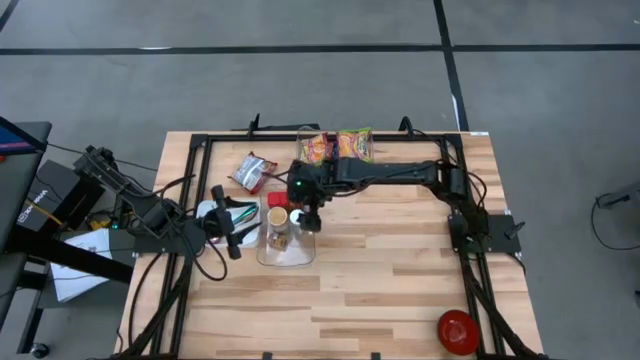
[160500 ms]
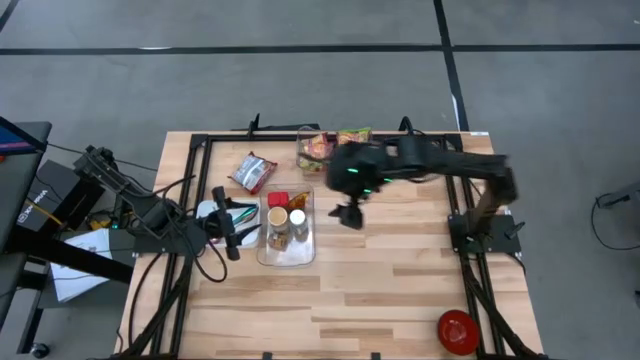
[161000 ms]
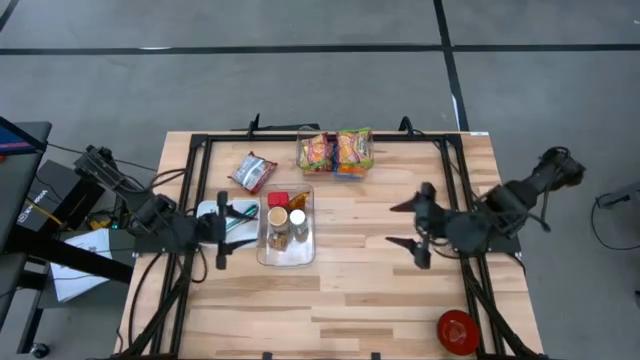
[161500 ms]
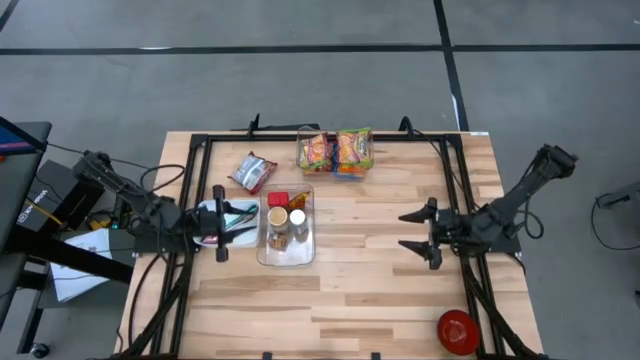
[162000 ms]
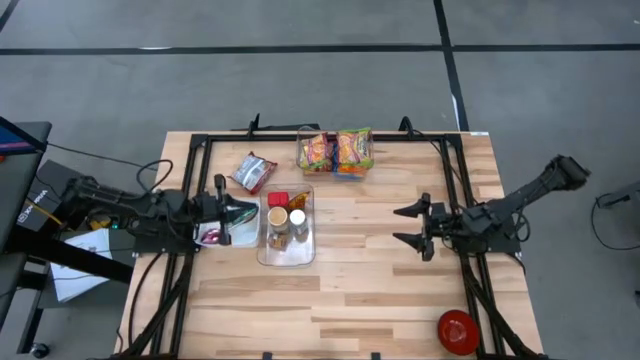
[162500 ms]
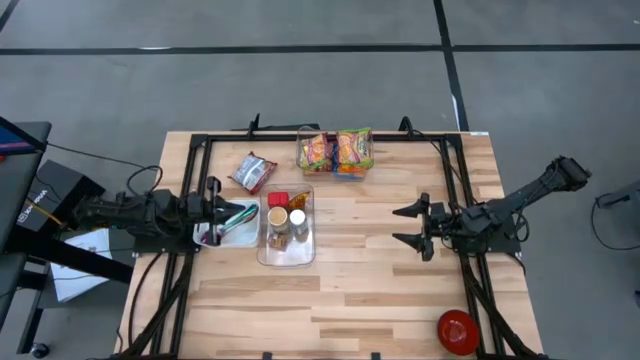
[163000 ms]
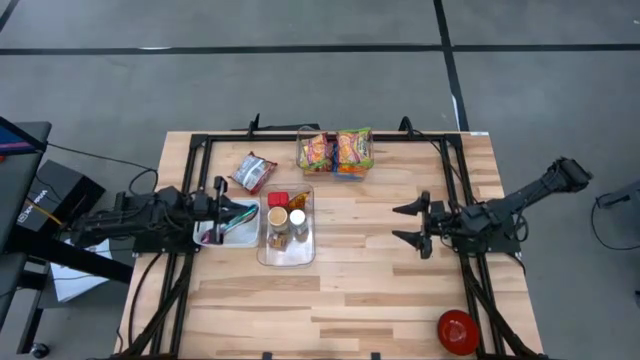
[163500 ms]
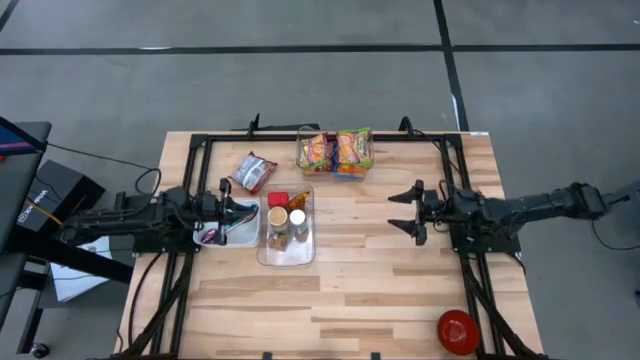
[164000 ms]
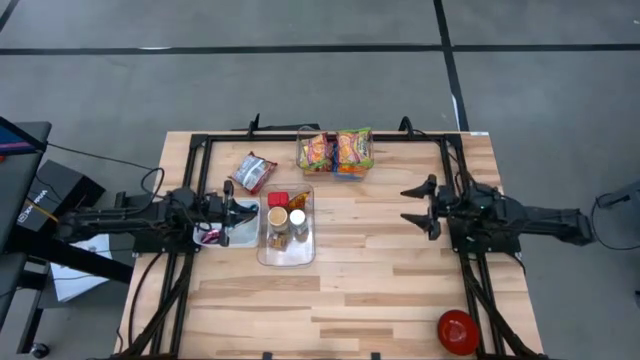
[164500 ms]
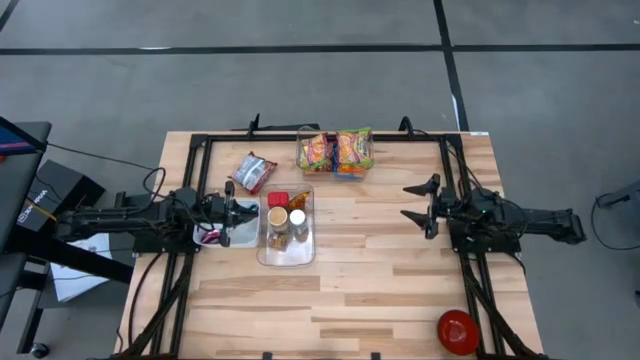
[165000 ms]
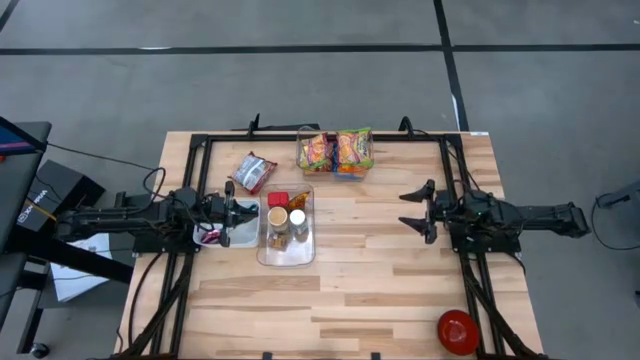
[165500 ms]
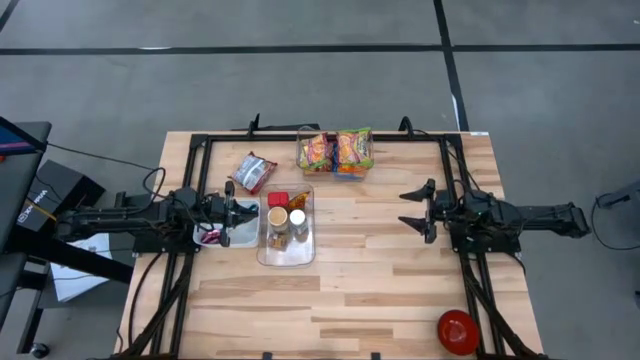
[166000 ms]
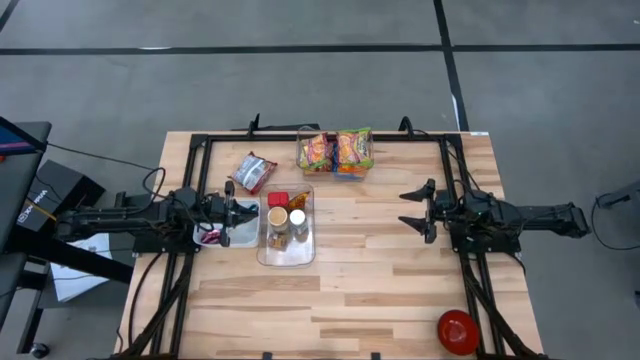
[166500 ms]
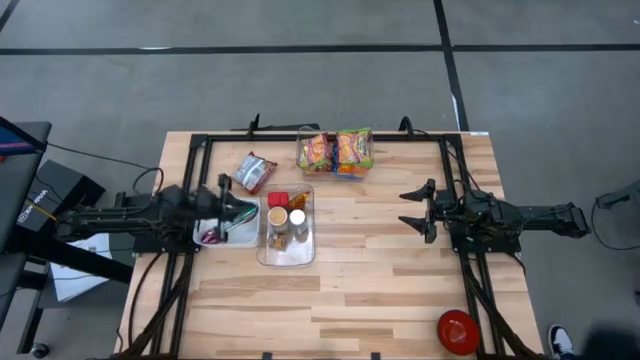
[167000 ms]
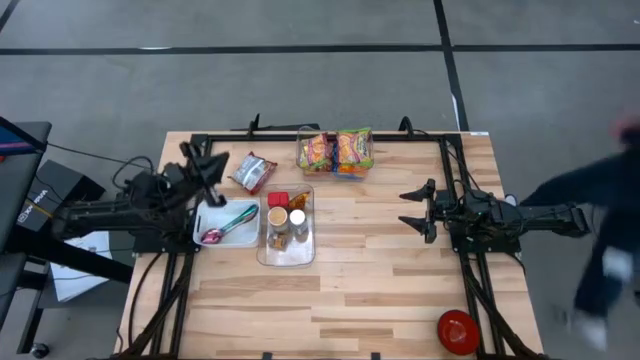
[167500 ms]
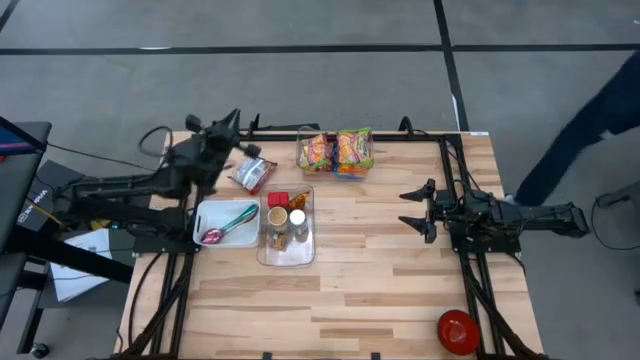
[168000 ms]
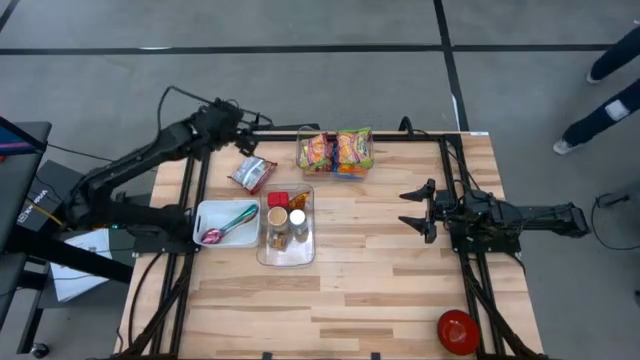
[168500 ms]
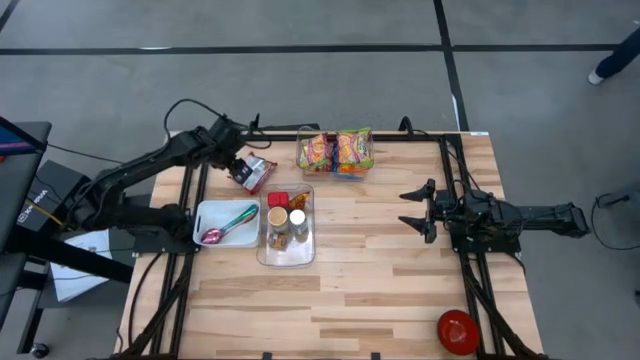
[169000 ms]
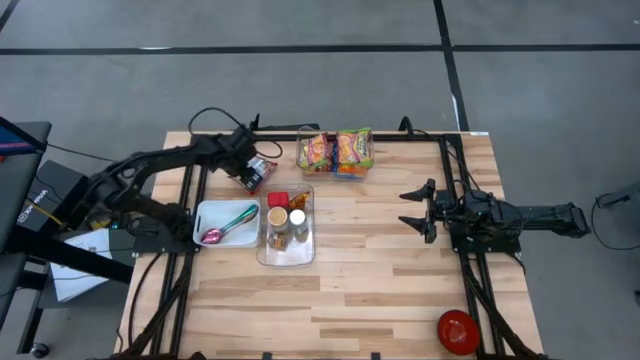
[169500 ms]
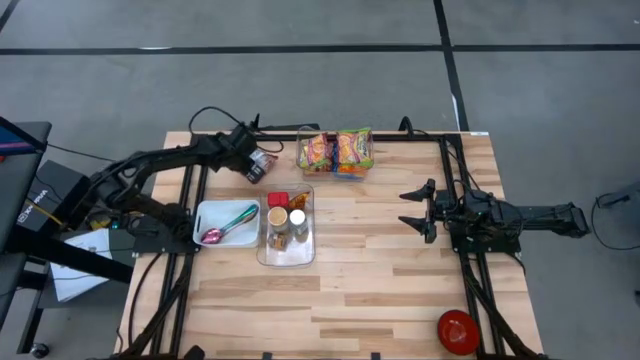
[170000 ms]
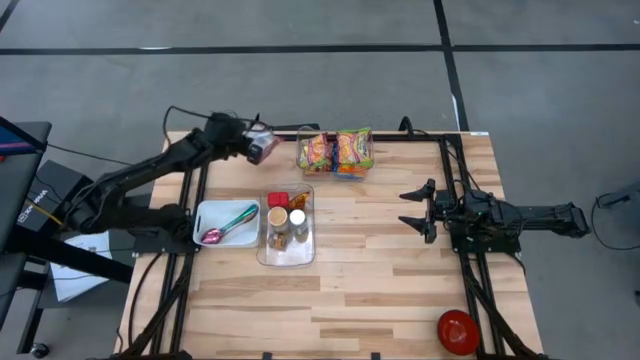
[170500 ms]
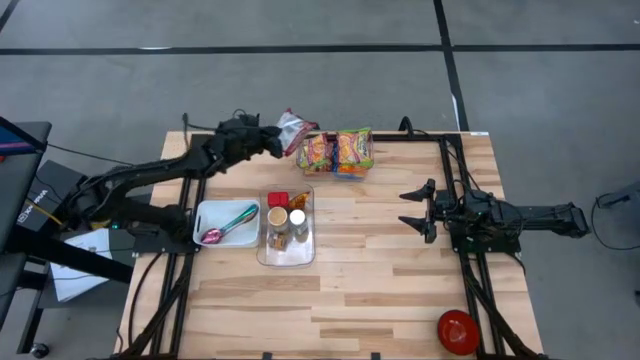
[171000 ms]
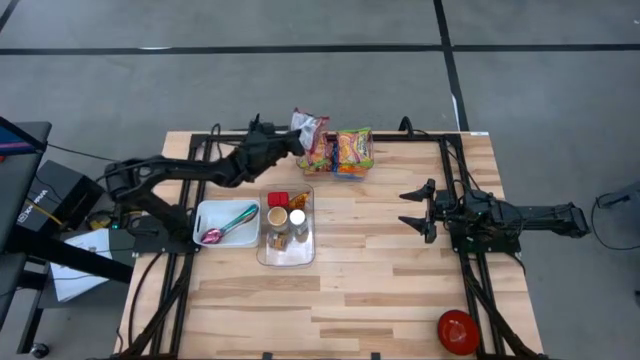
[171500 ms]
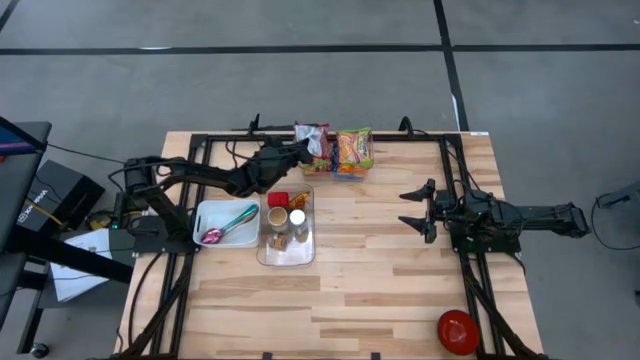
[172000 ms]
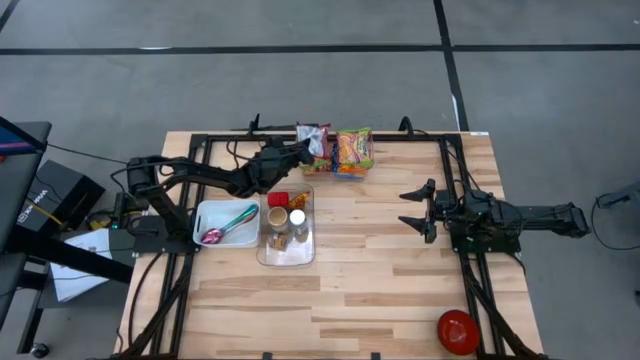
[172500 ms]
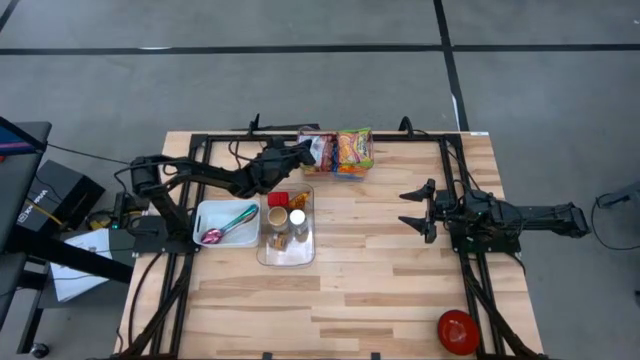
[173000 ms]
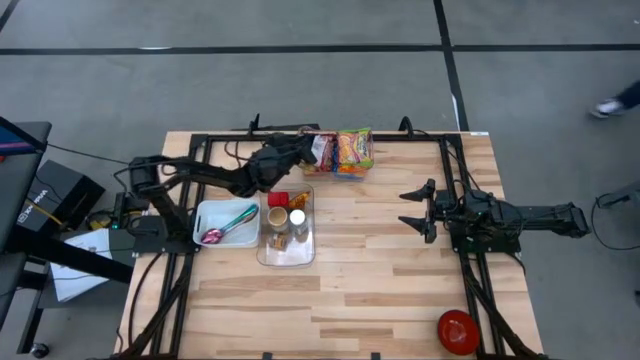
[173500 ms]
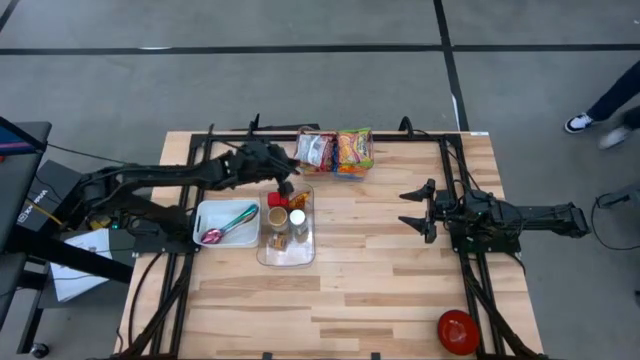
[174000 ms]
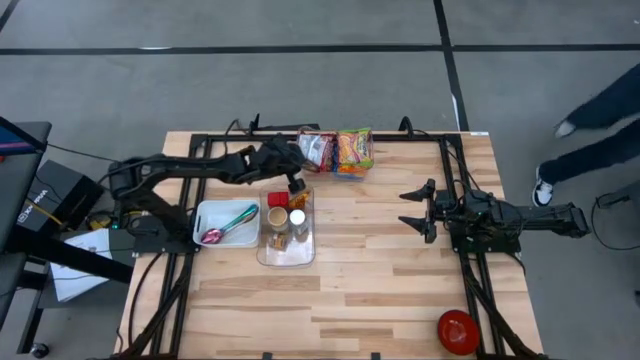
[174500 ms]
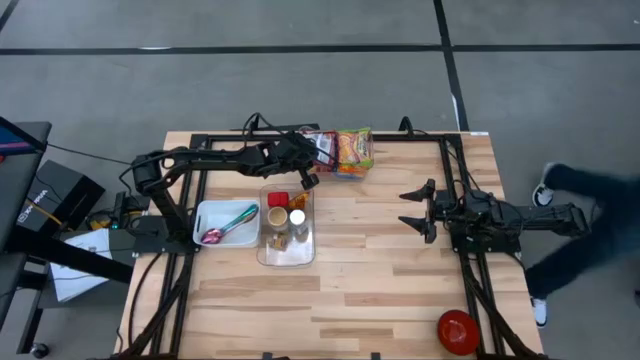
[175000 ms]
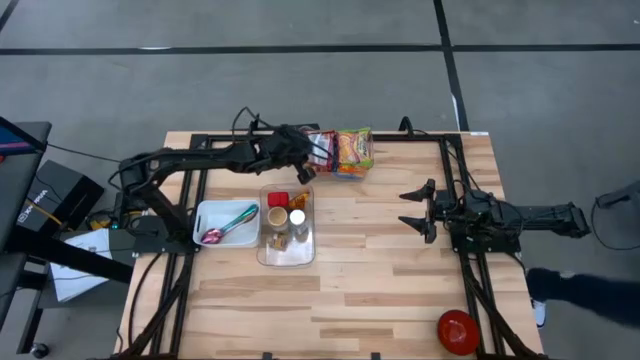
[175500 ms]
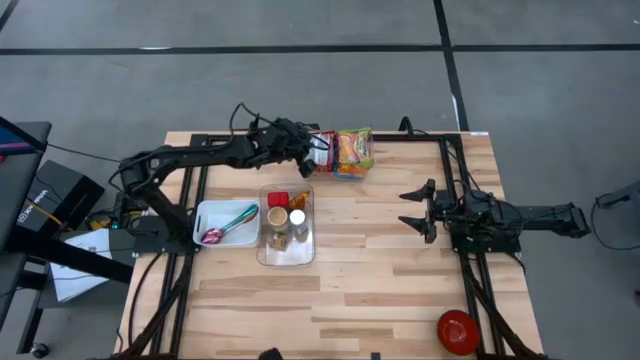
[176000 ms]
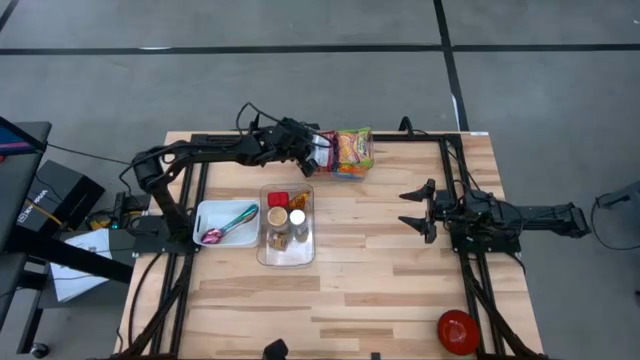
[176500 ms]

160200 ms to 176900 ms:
Task: Pick & Place Food Item
Put the red noodle pack into the top transparent bin

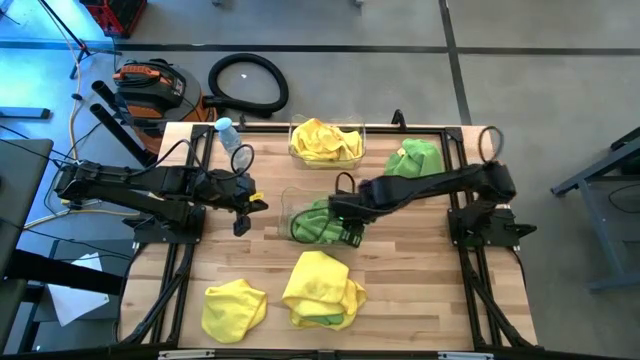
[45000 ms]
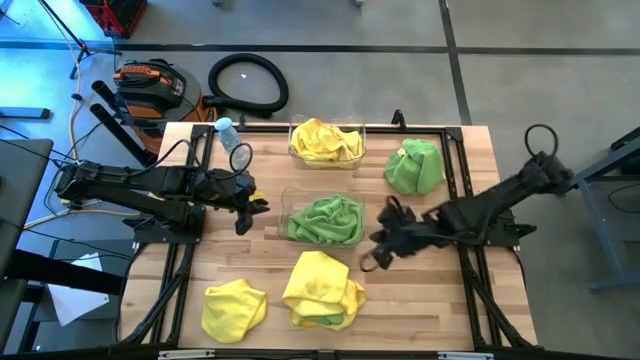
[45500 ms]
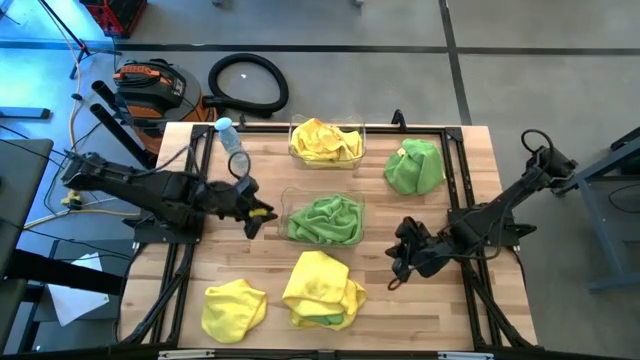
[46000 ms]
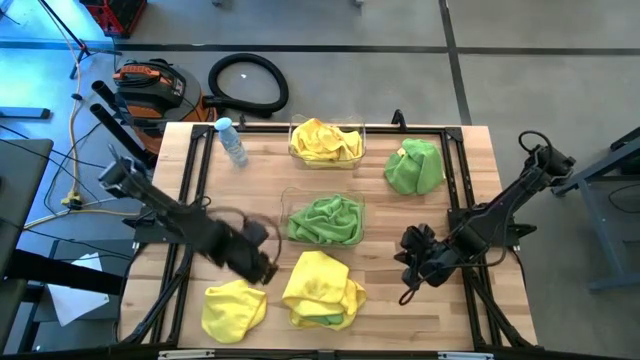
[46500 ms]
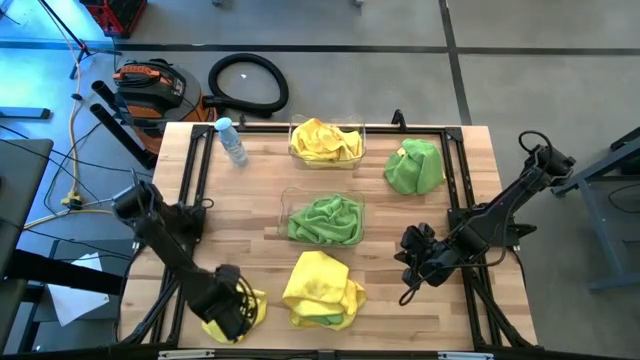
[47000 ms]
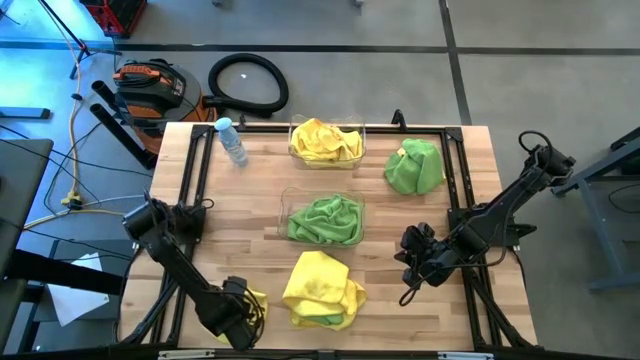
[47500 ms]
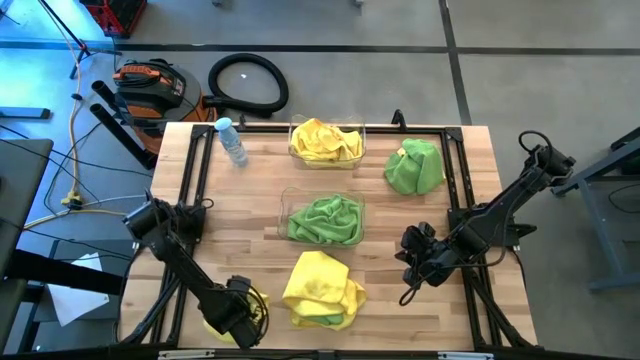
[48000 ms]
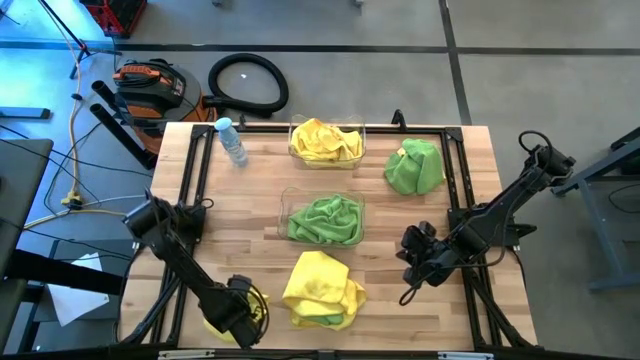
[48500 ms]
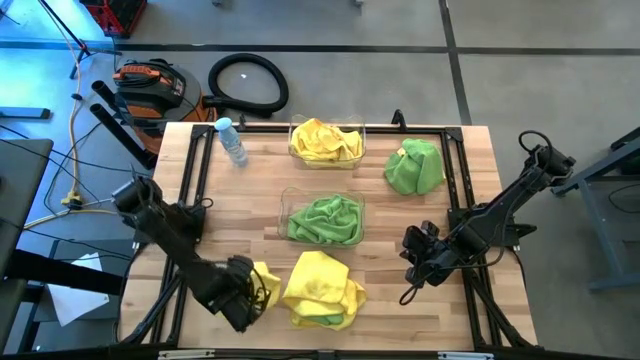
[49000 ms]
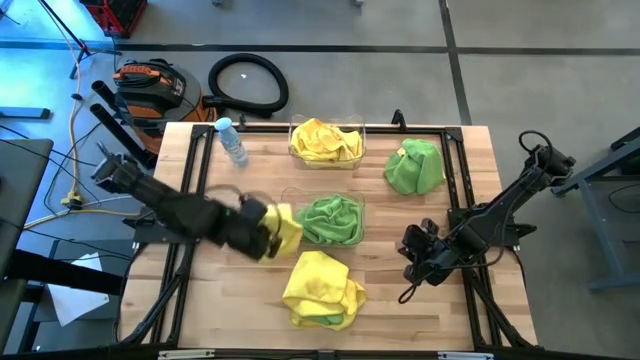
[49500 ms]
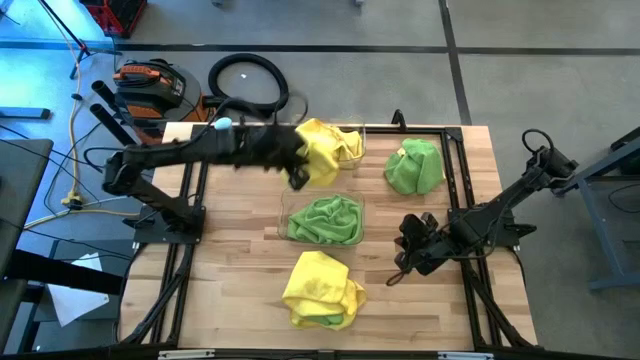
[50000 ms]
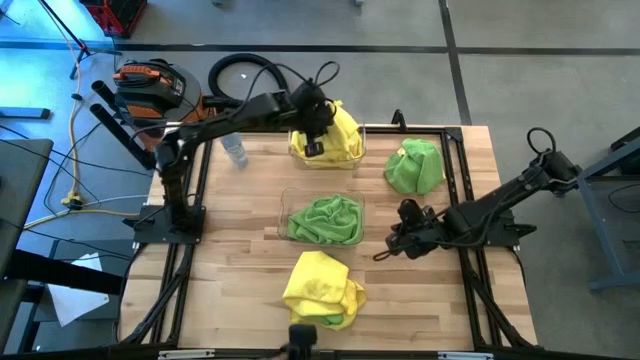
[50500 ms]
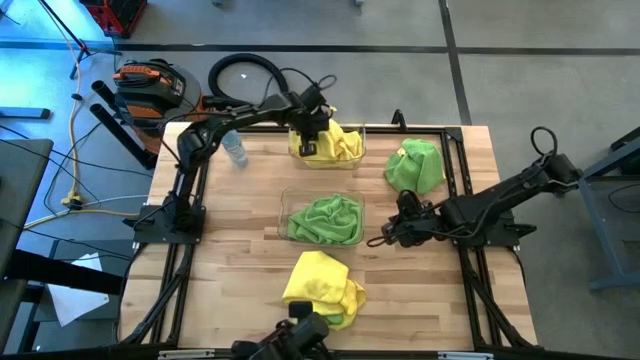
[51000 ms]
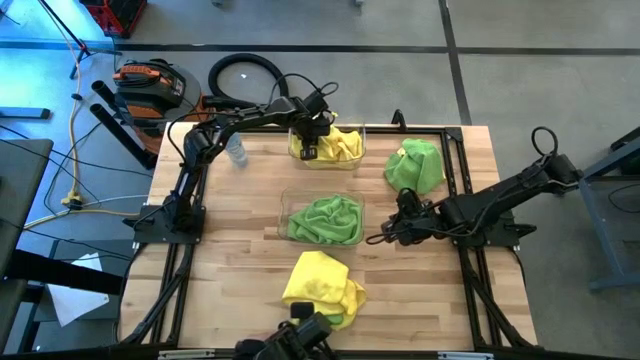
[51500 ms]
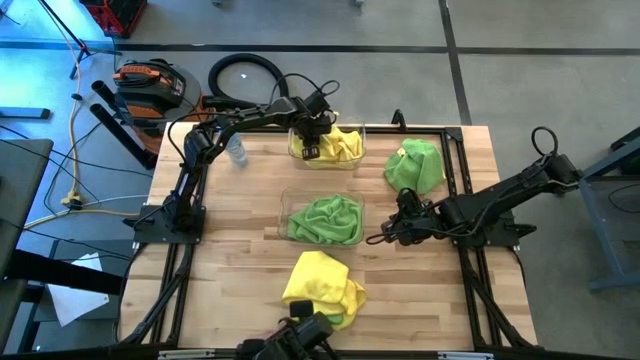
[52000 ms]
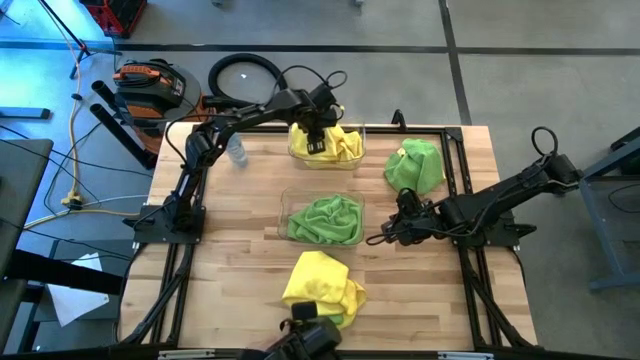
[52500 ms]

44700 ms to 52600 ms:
Task: Sort microfiber towel by color & place in baskets
Put the yellow towel into the top transparent bin
